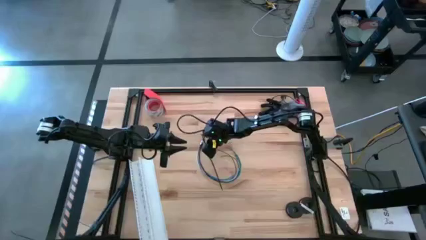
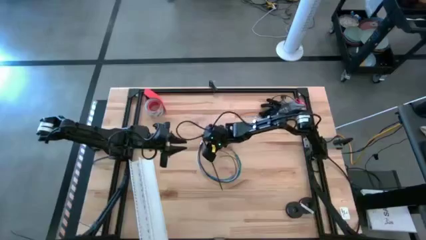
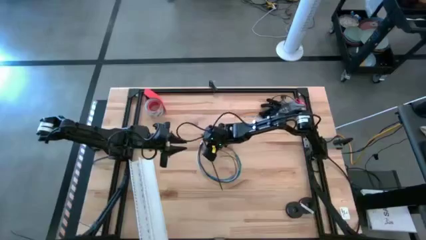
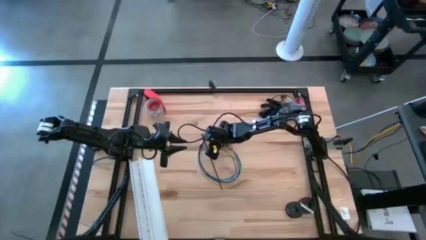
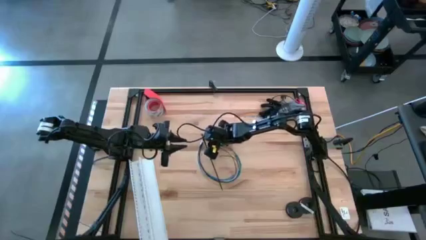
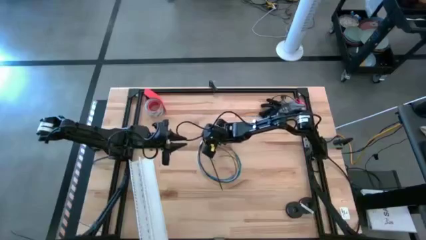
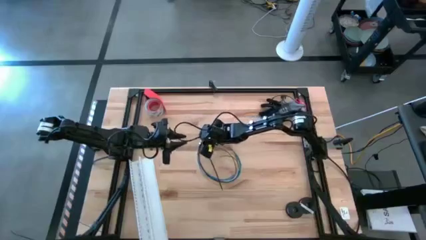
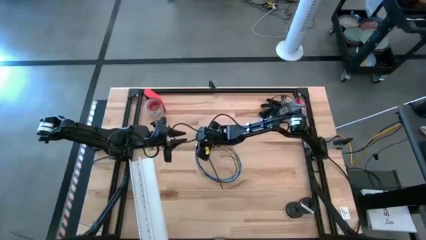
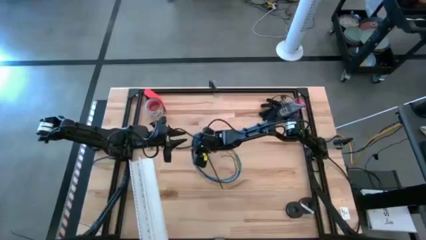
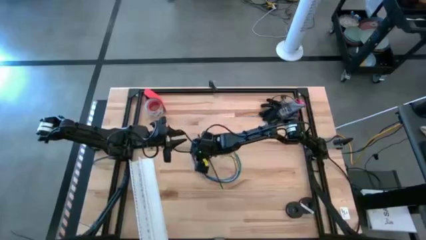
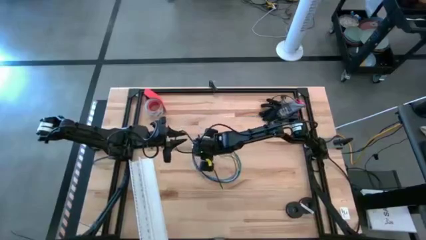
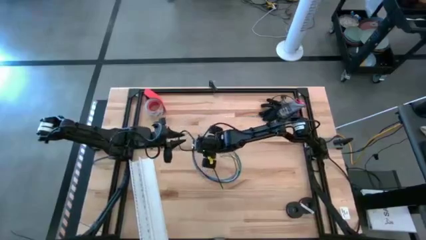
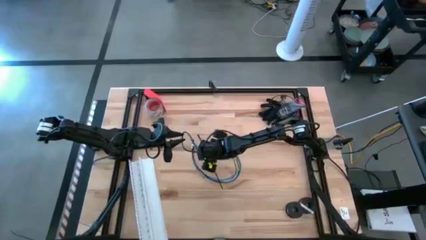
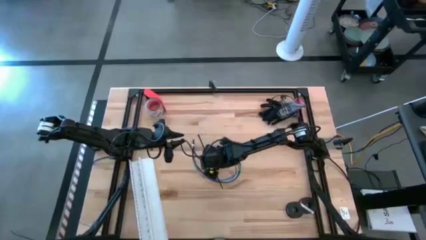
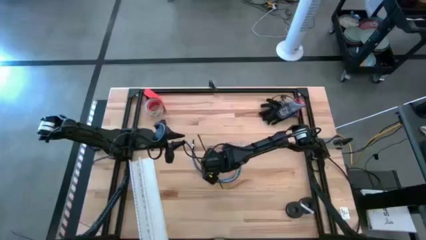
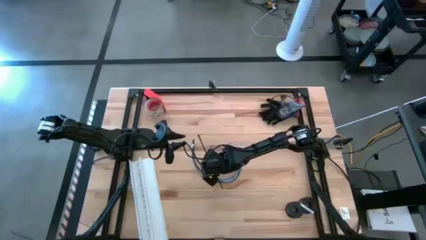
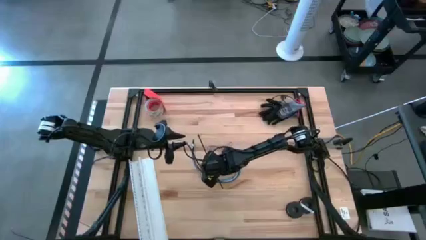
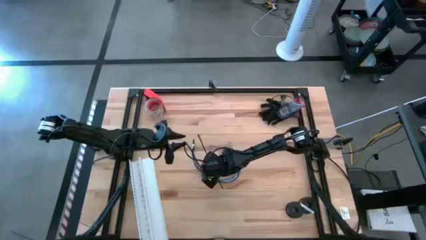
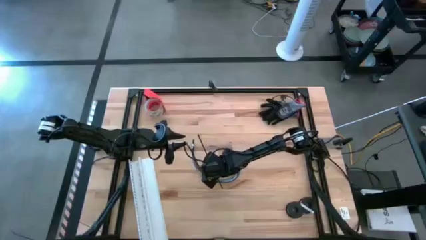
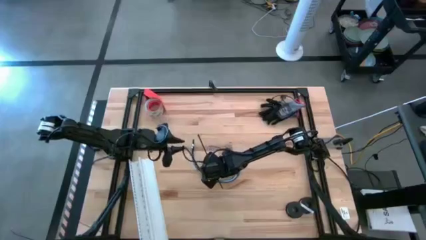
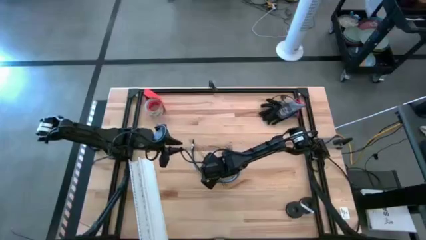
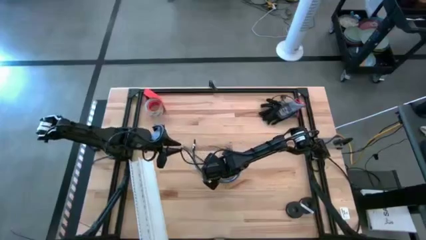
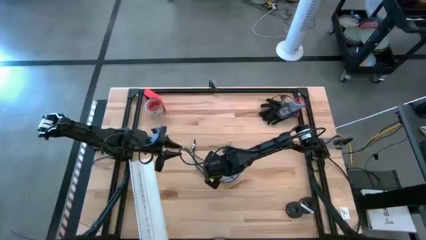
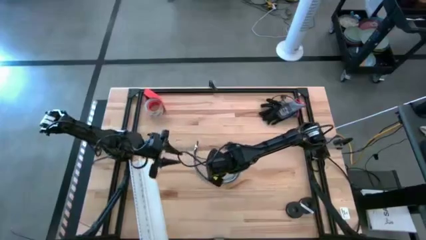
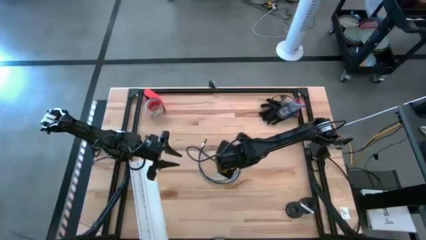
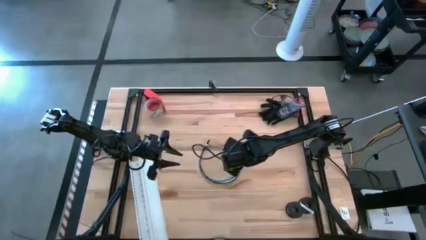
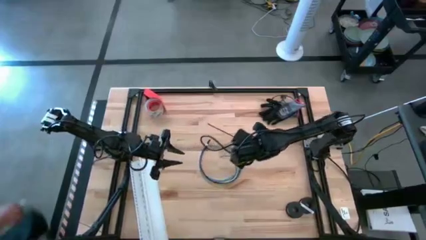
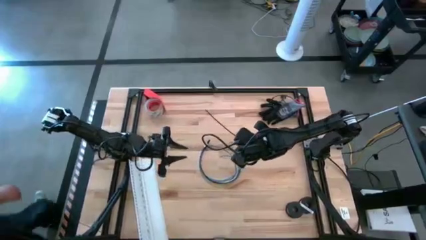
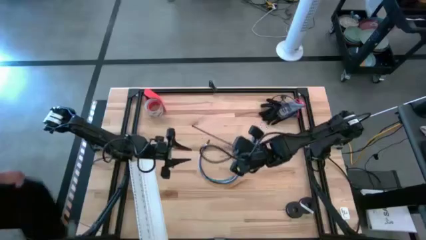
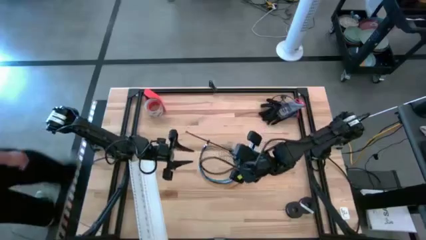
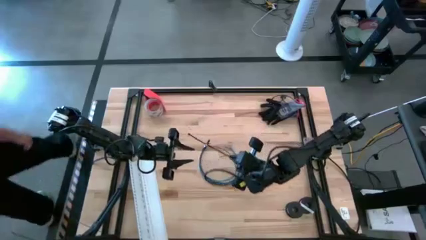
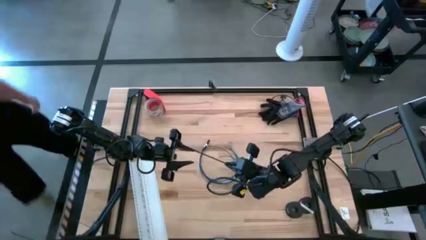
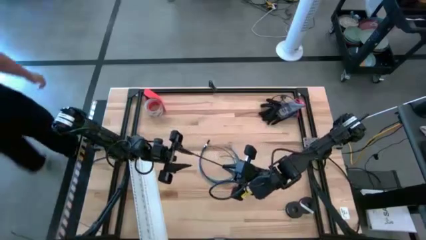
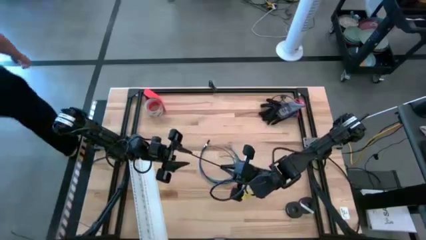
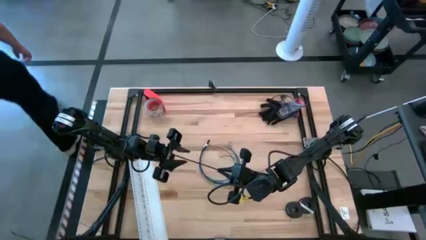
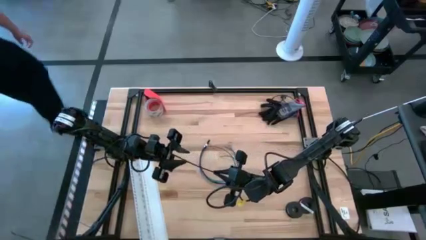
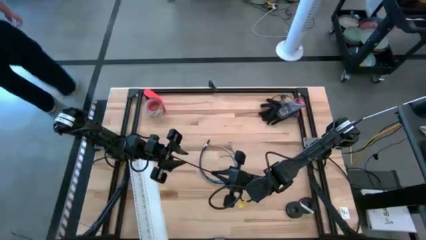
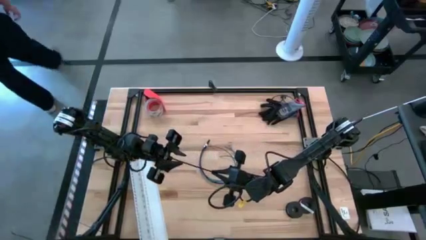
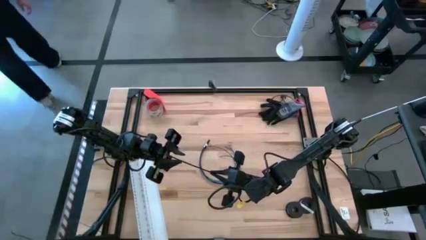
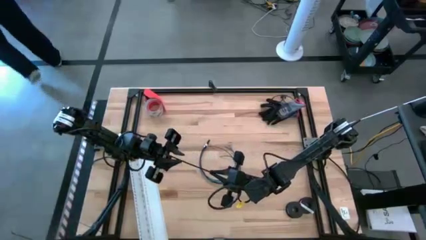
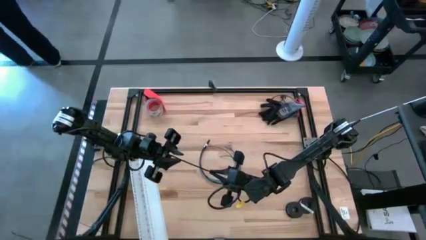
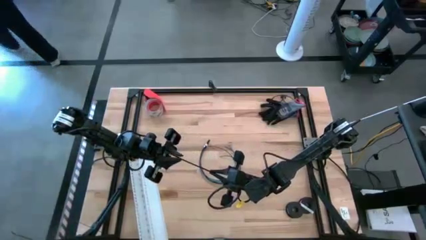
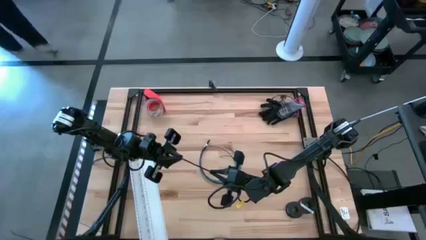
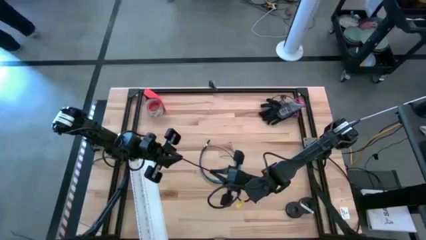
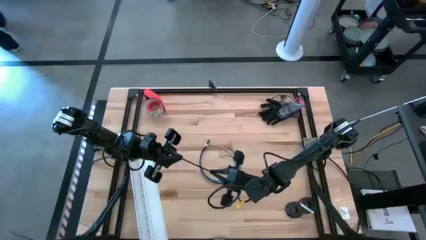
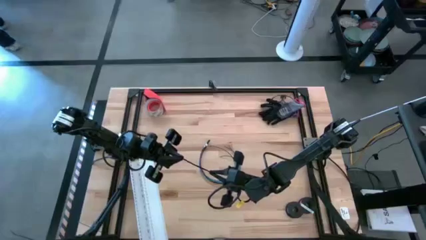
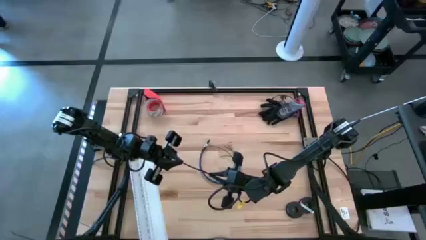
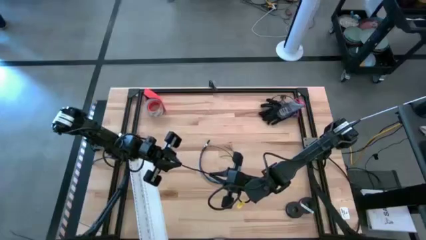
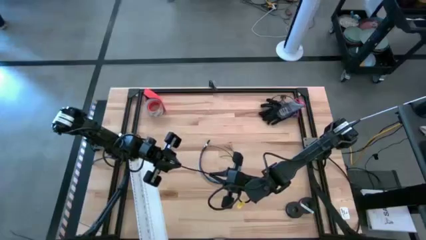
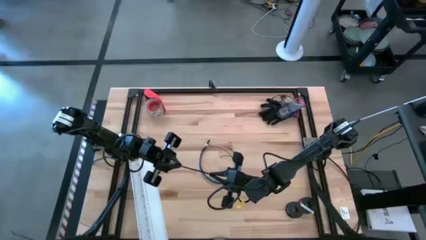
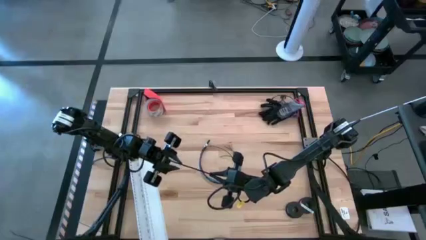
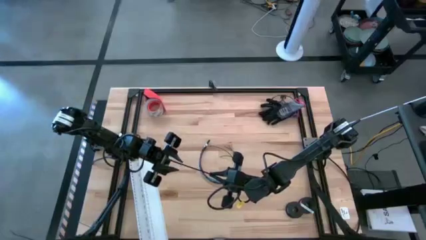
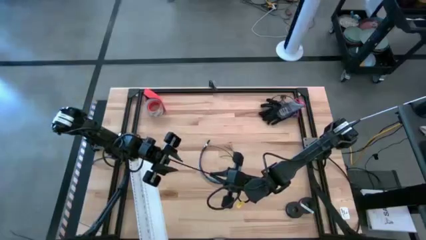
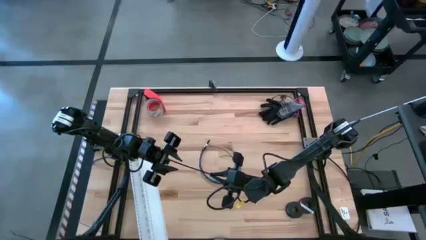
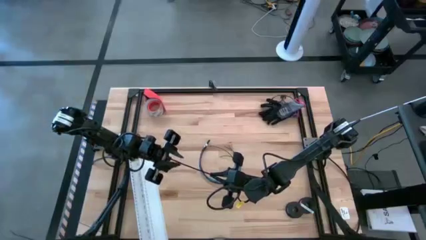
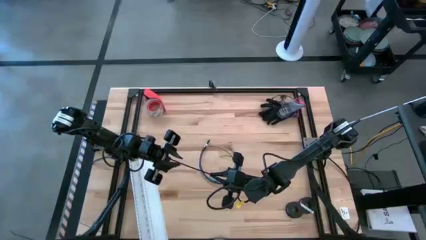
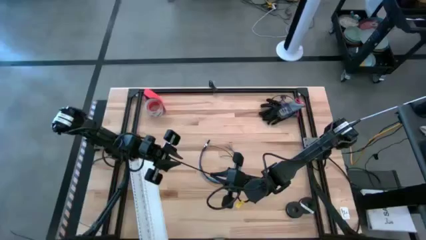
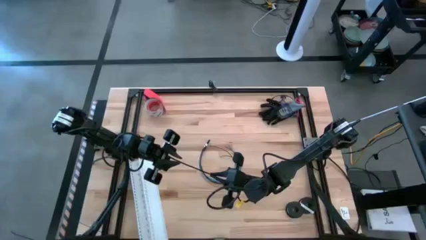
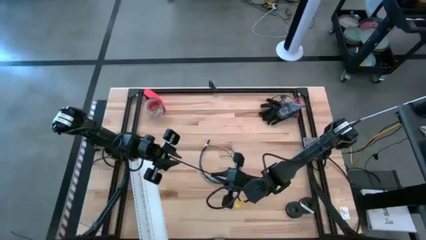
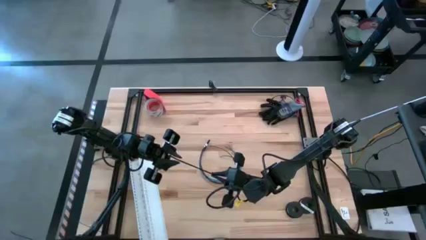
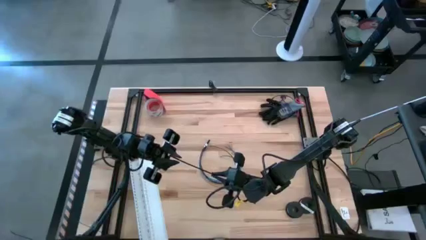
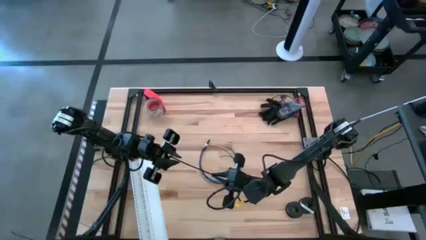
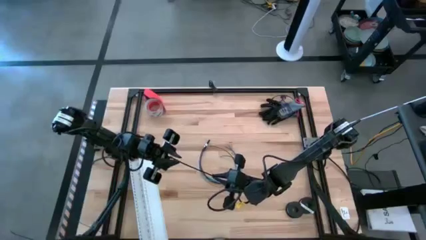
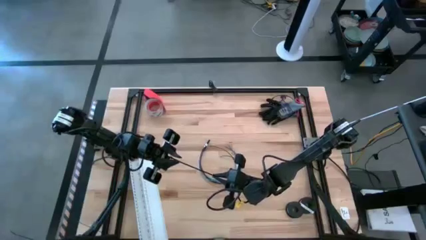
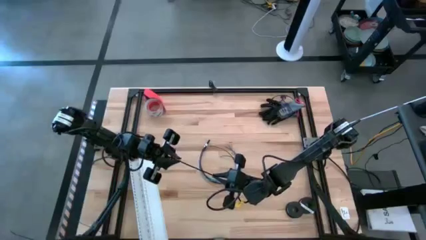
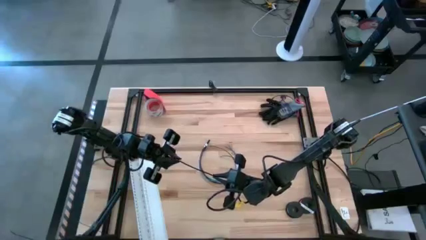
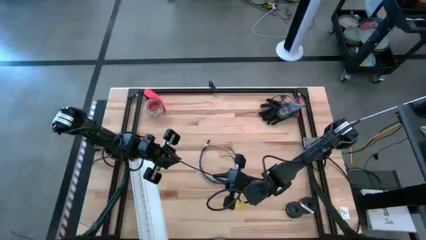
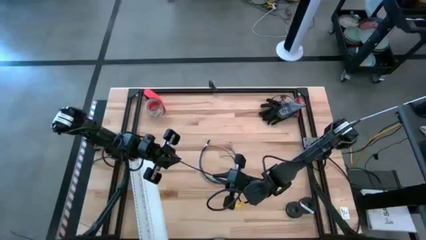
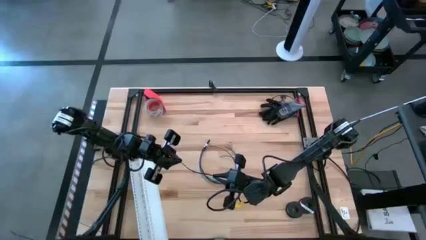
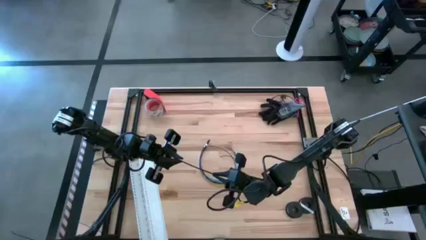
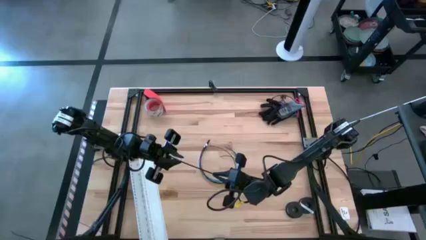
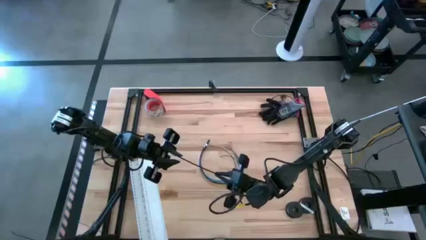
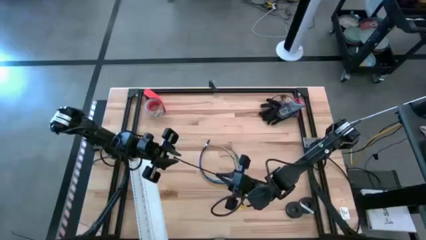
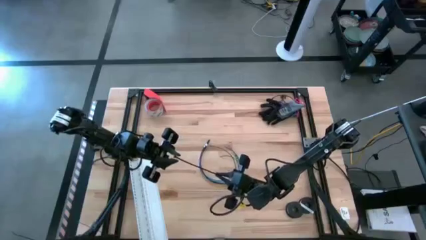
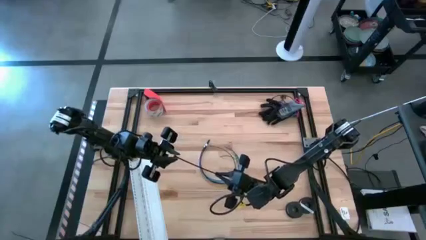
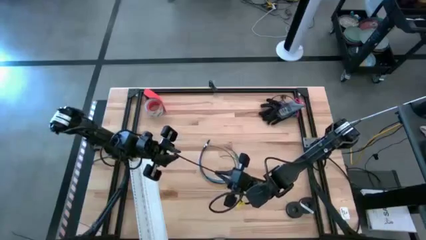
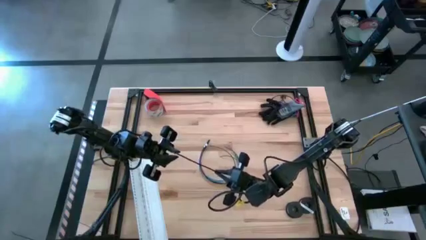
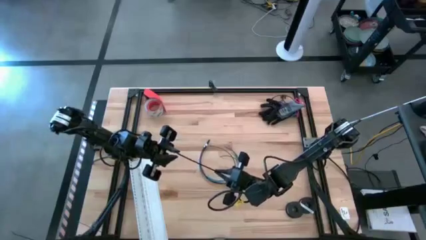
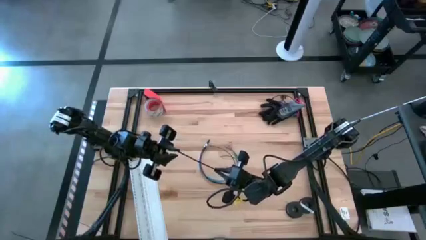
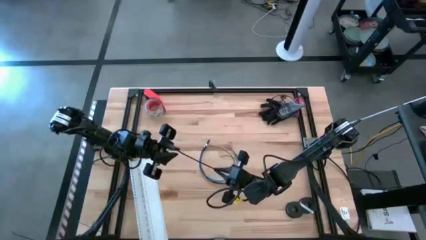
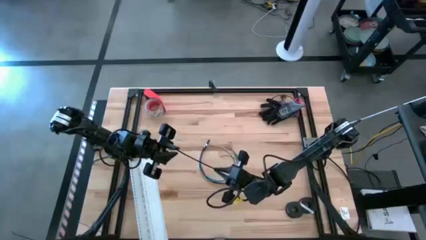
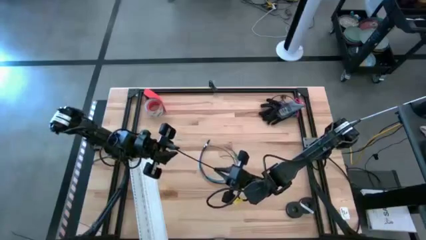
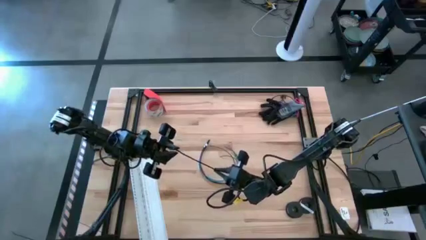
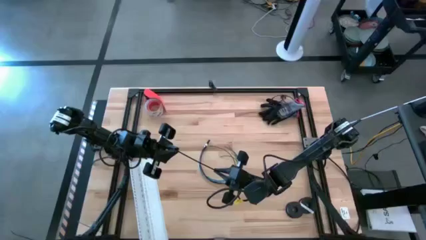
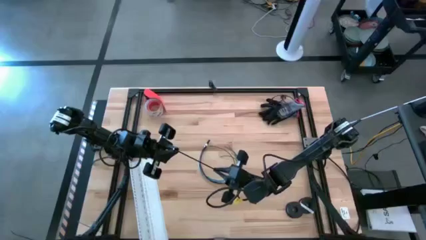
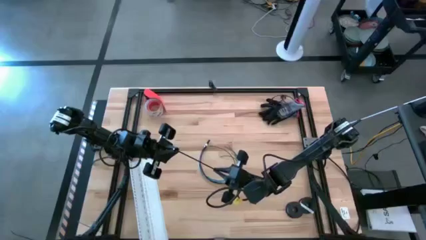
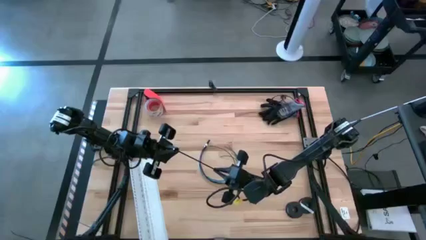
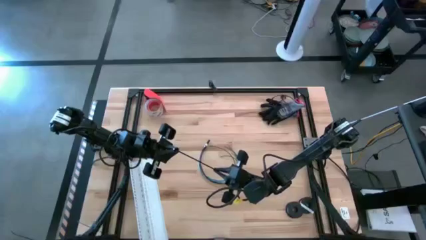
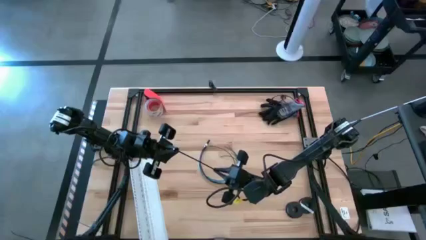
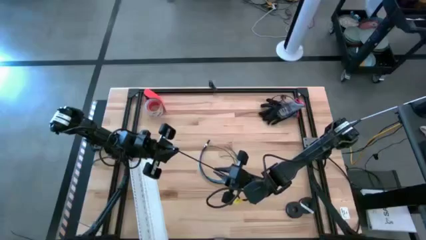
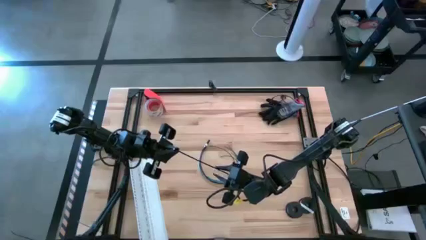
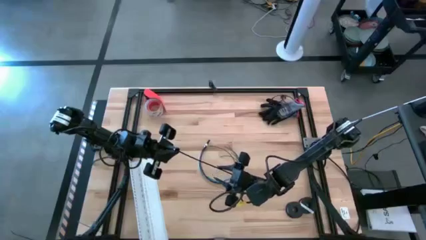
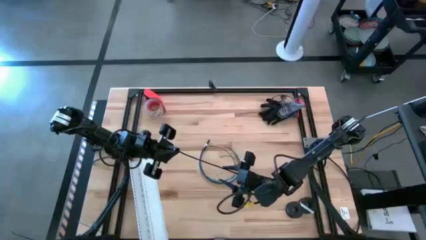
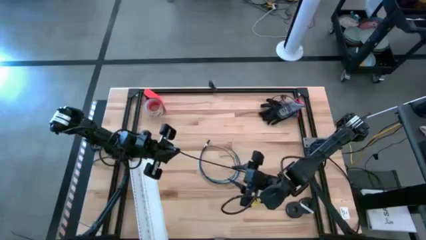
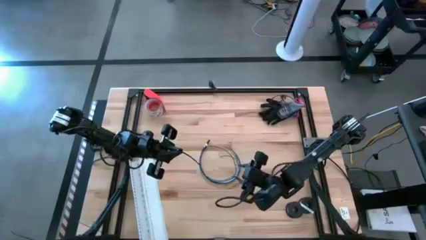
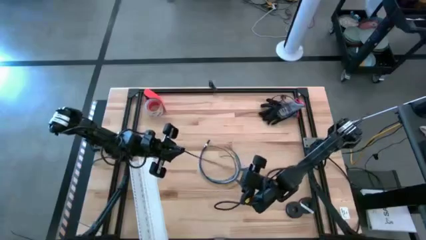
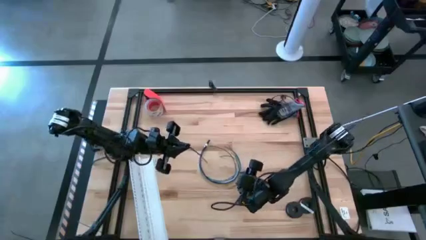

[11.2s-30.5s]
Task: Ziptie cables
Put a zip tie on the cables
